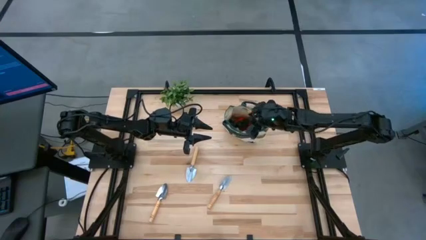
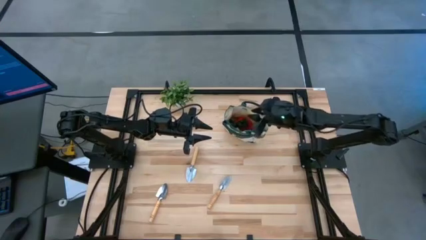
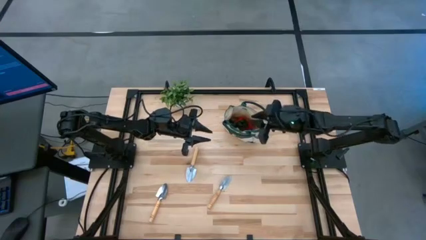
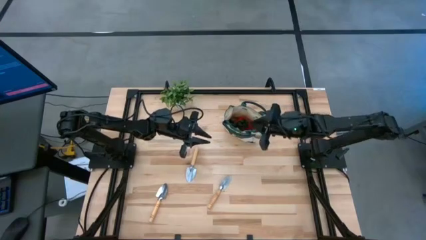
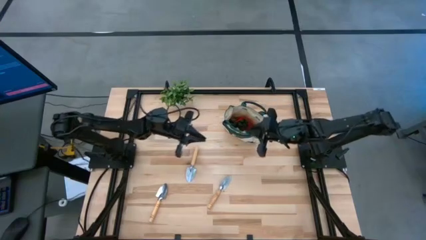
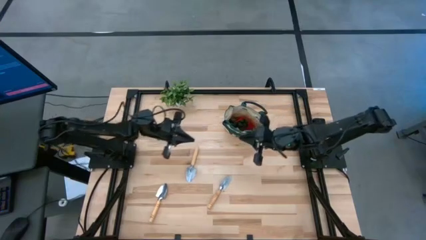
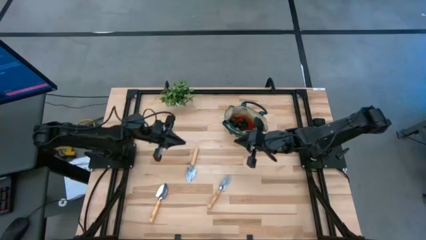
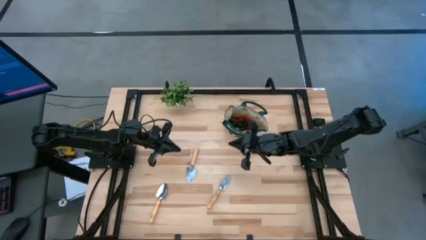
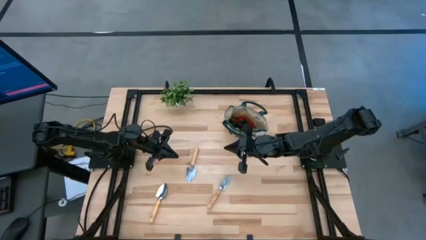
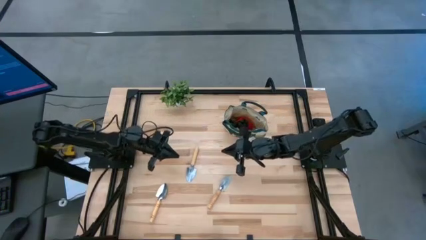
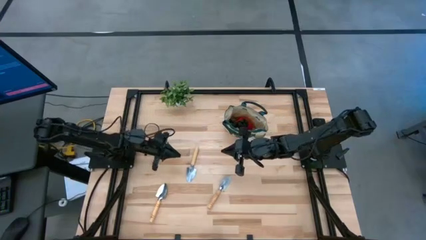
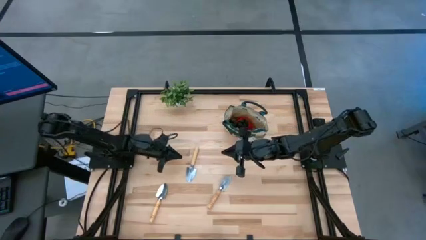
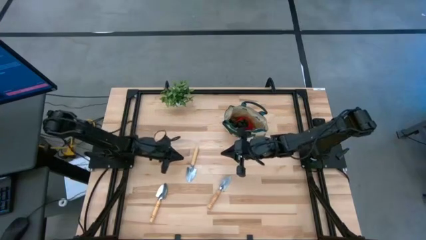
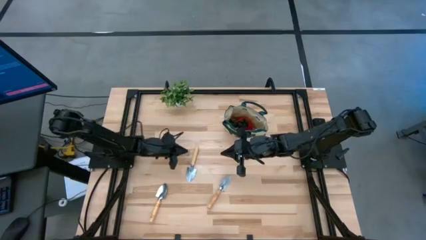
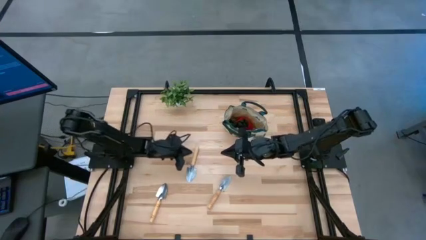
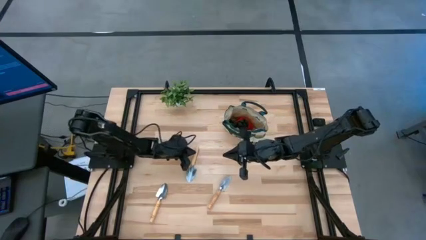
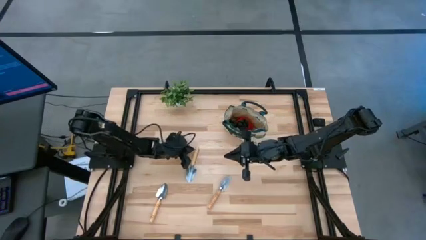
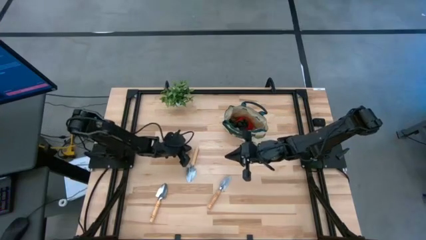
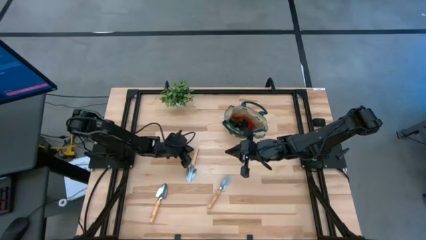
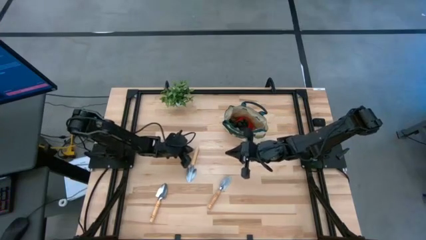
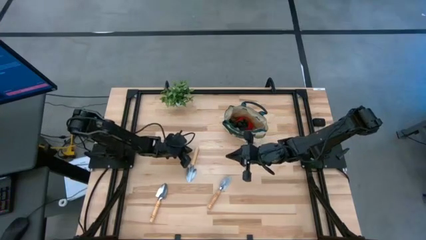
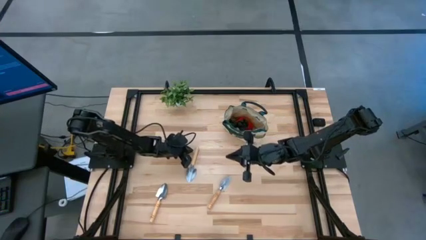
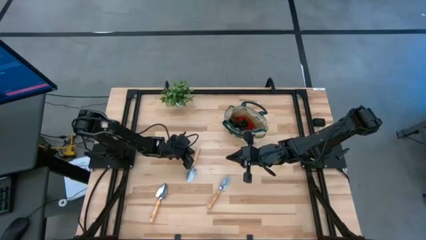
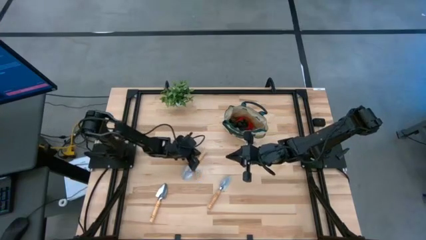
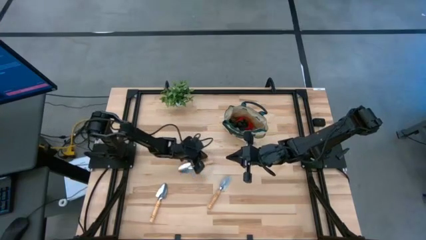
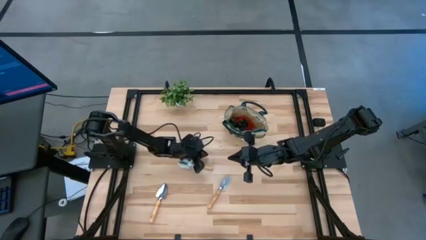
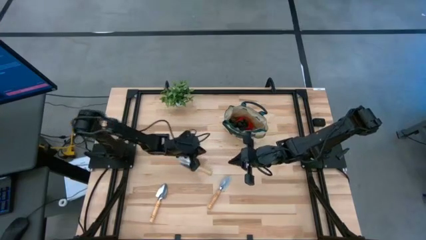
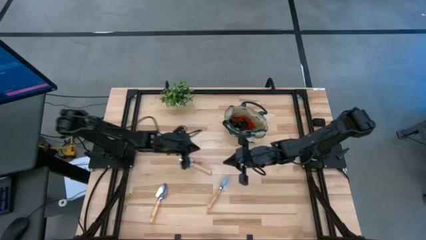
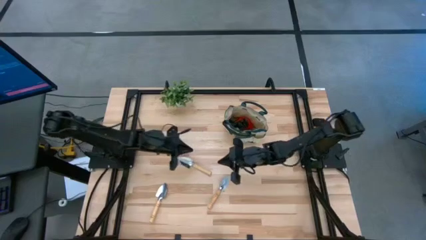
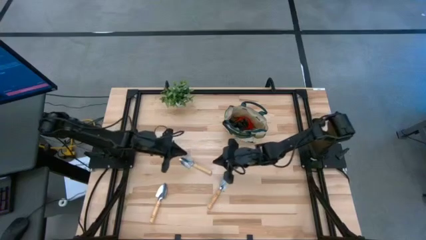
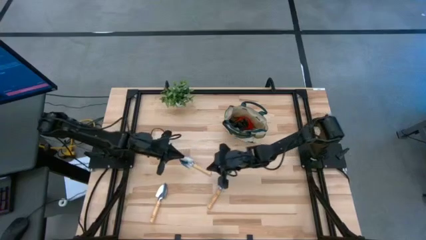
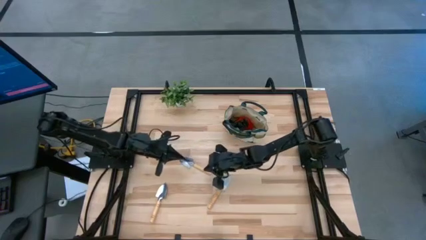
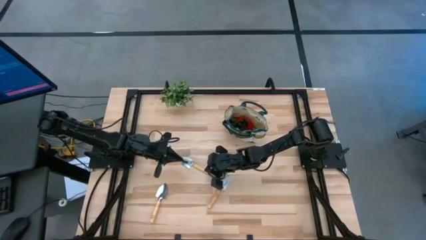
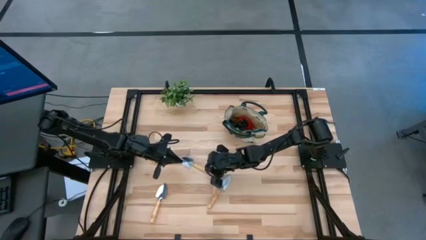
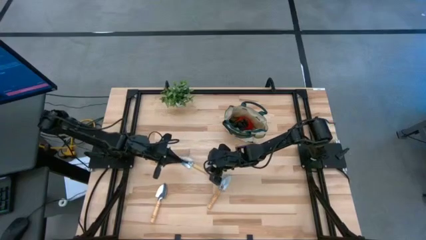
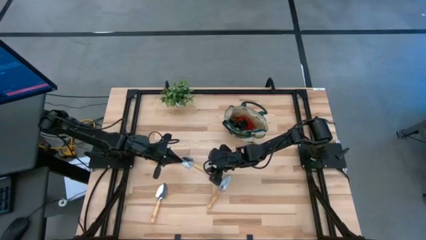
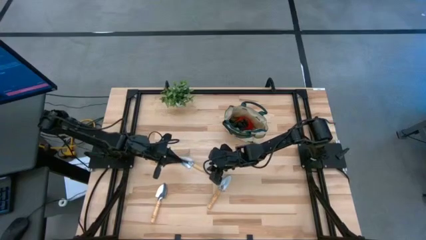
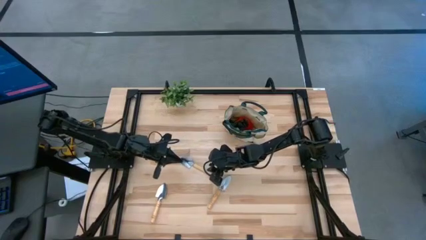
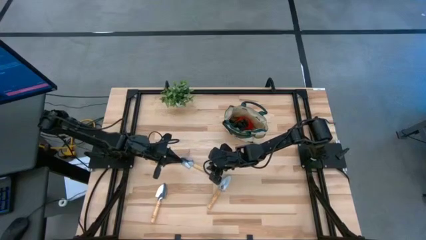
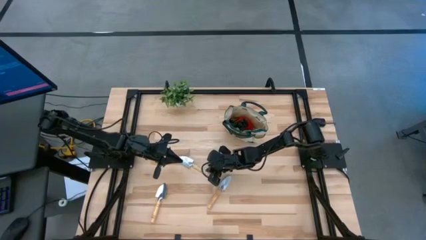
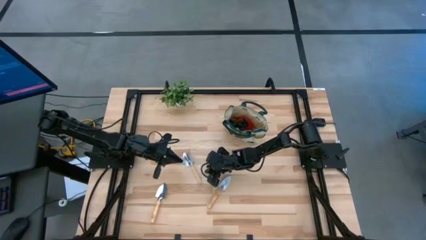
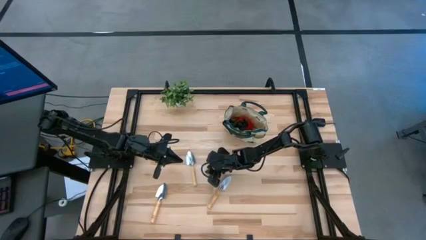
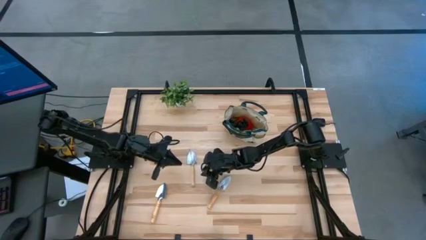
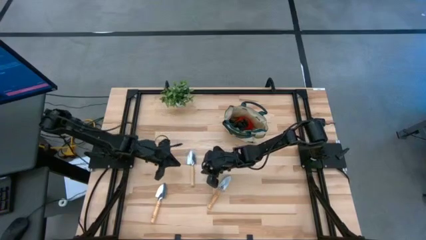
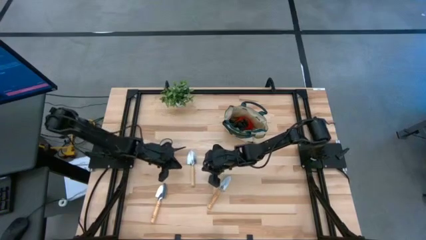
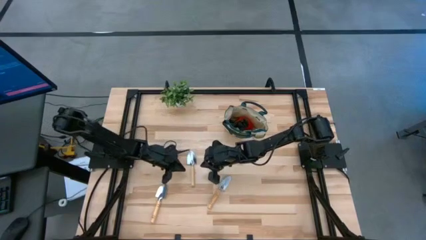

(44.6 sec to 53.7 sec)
Task: Pick & Place Garden tools in Gardening bag
Put the trowel into the gardening bag

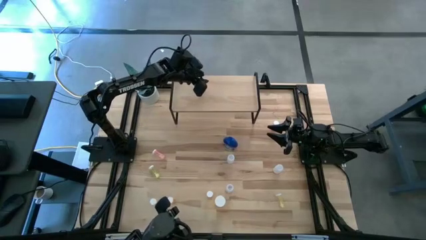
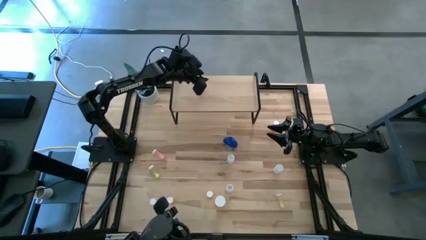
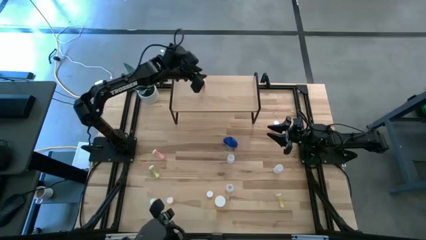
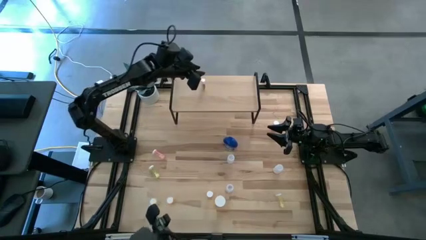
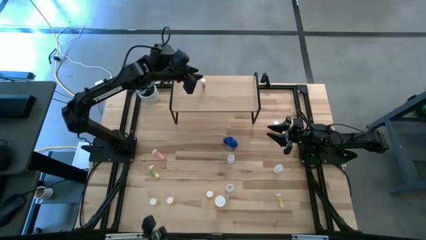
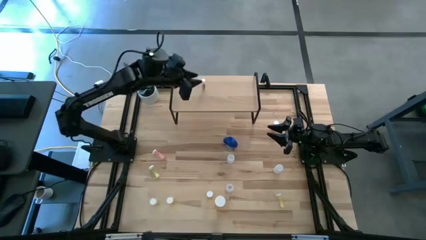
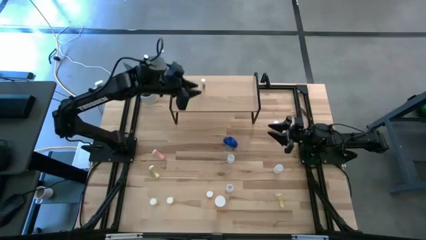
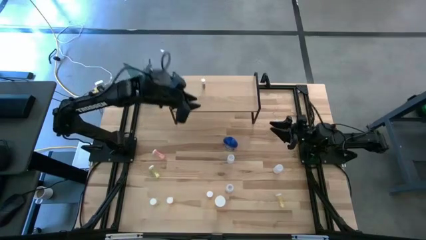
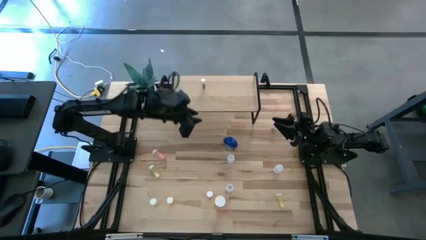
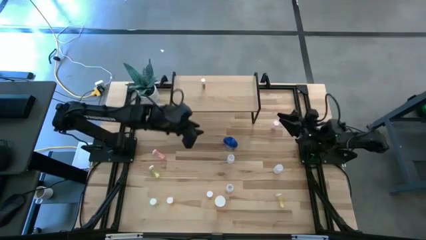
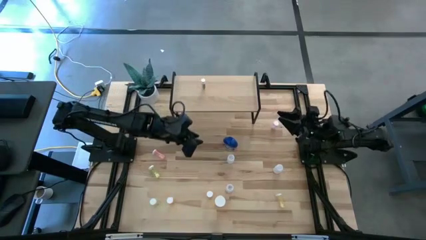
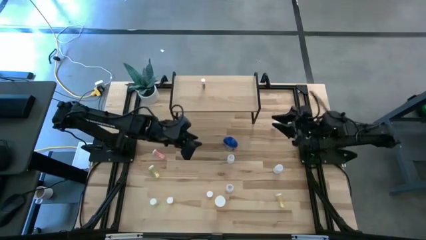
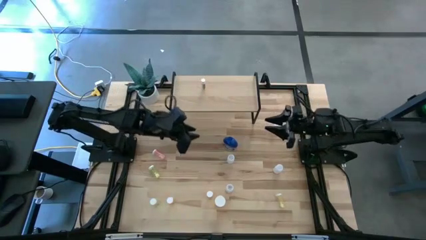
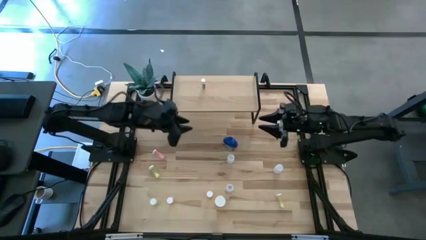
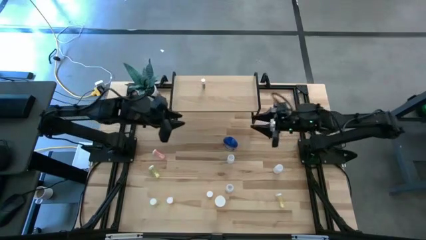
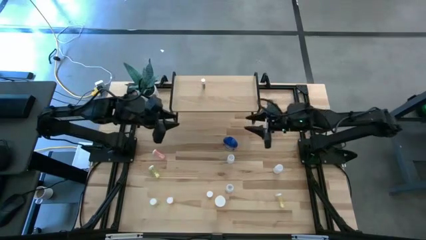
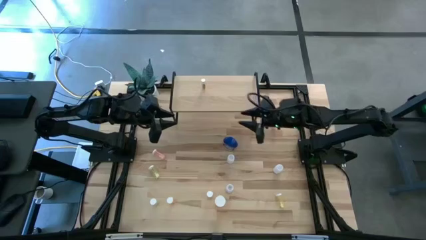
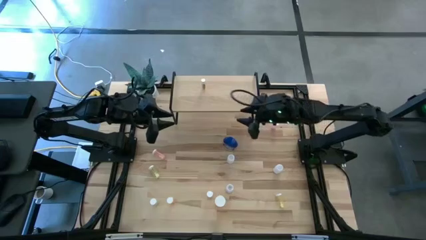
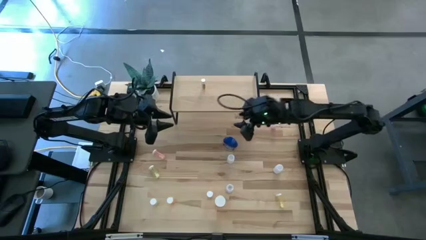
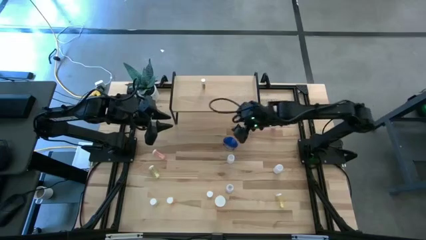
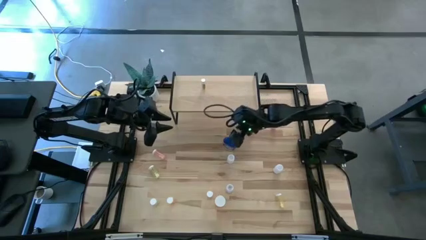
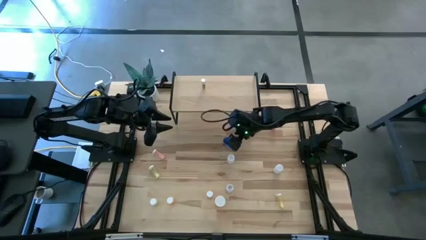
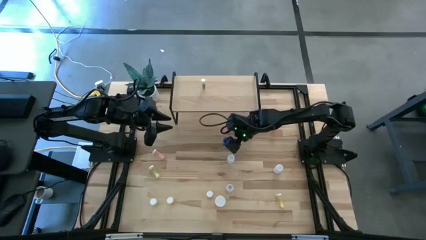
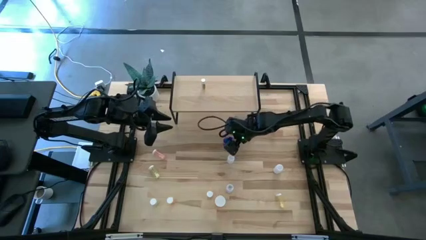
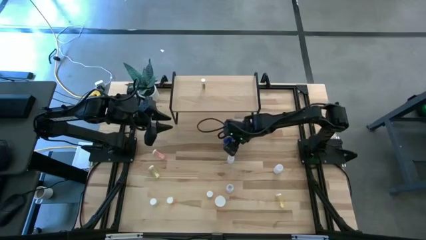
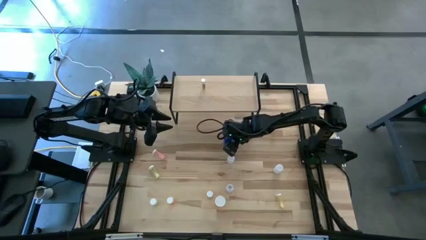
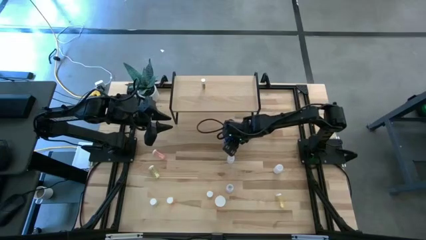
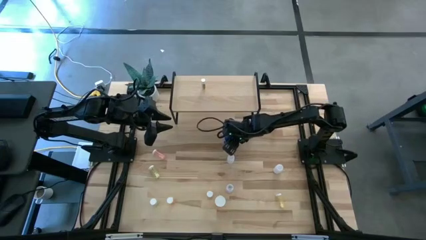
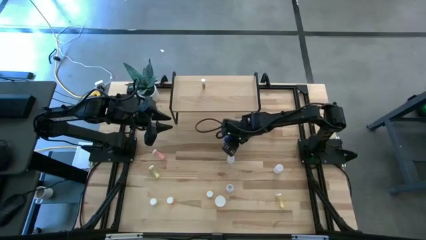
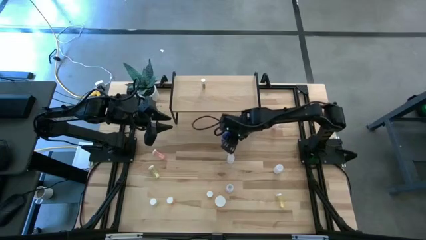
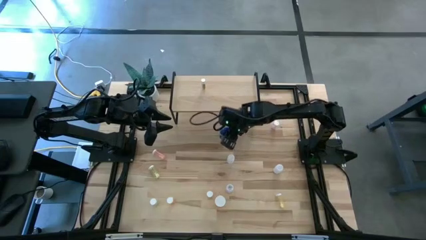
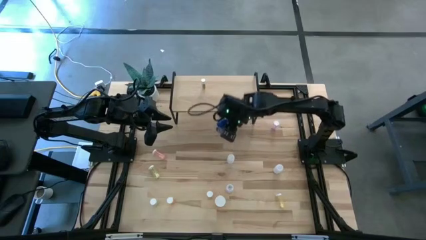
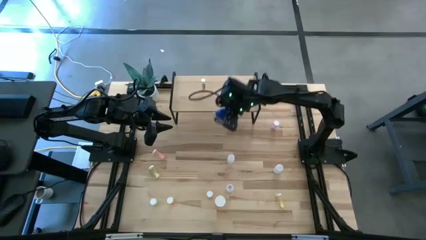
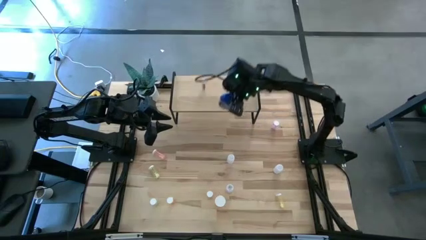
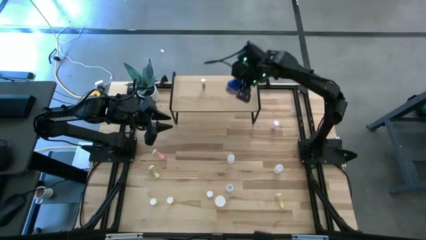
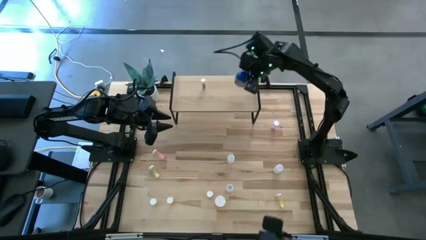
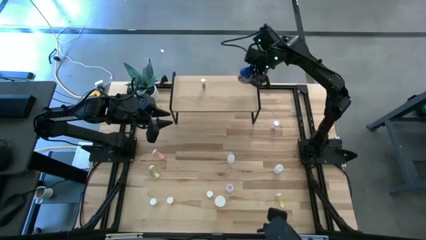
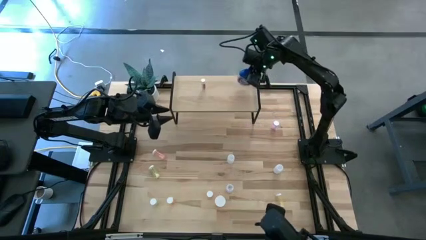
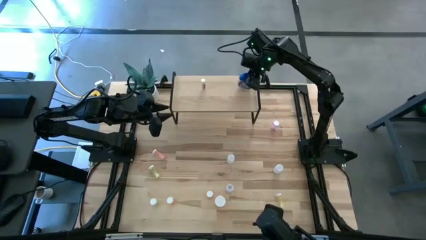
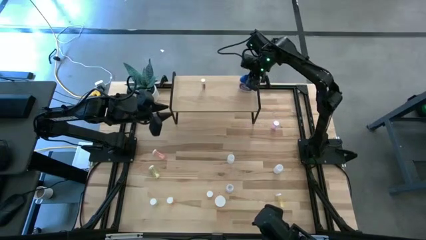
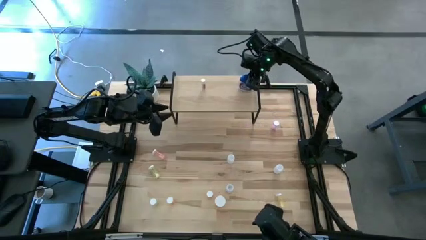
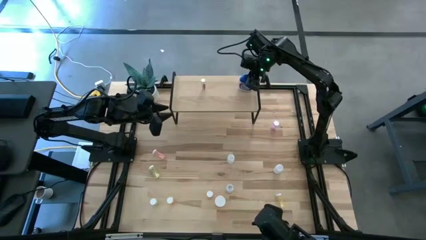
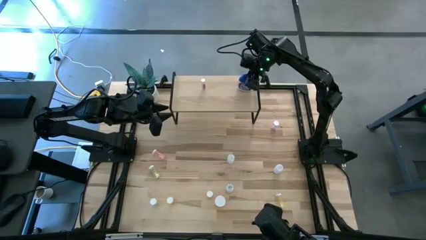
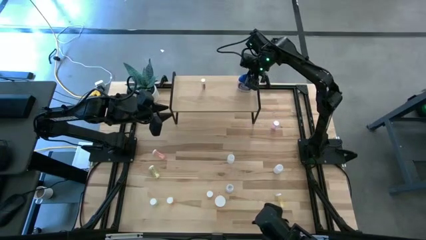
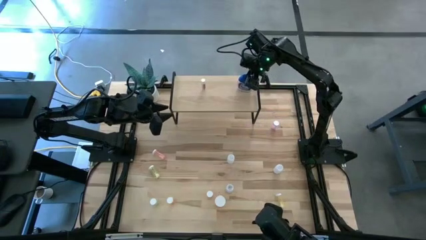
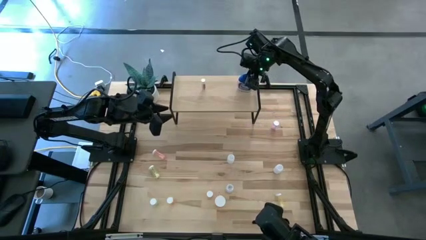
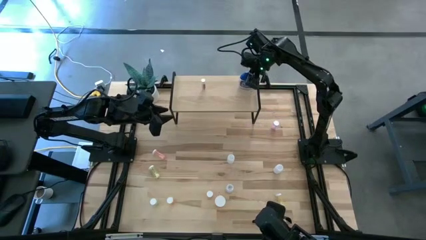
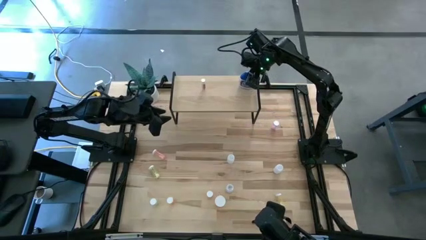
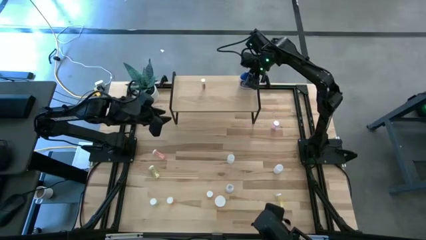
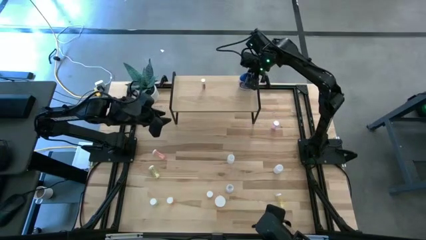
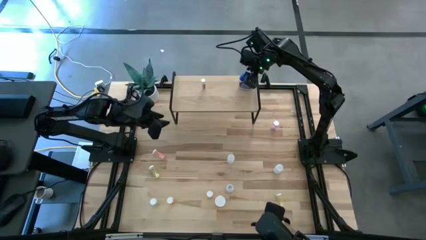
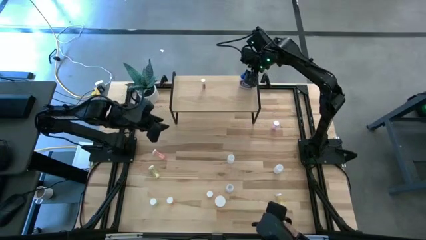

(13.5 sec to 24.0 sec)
Task: Pick and place medicine bottles onto shelf by color
Put the blue pill bottle on the shelf
